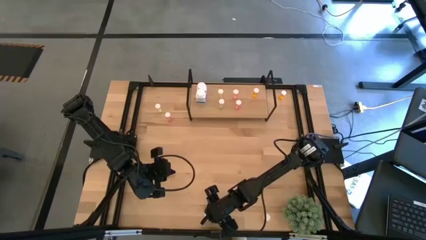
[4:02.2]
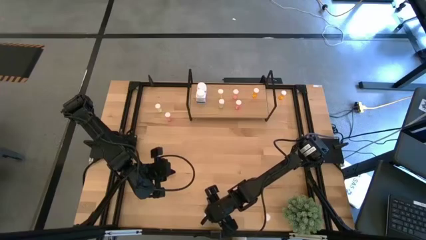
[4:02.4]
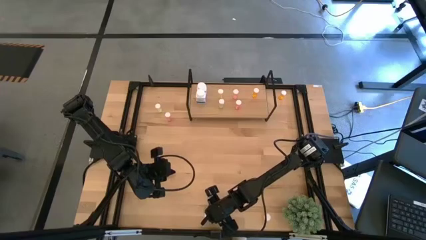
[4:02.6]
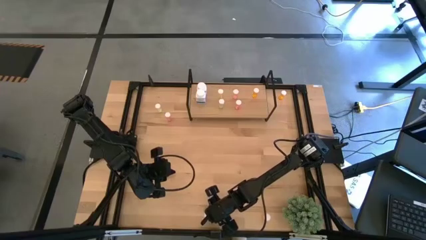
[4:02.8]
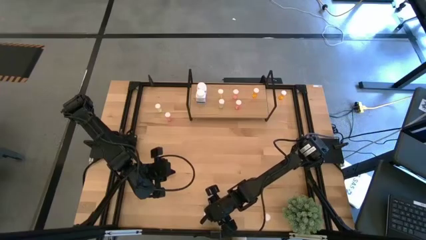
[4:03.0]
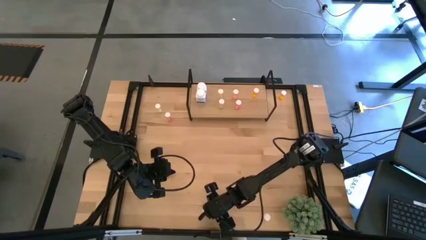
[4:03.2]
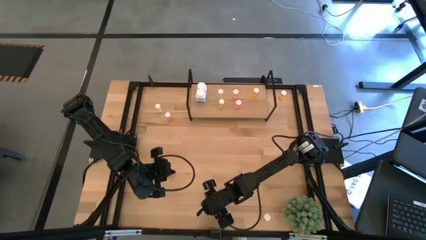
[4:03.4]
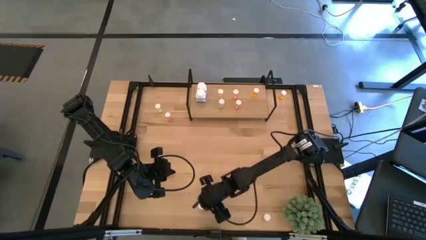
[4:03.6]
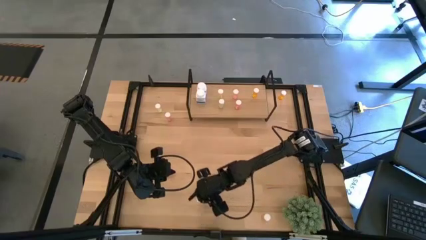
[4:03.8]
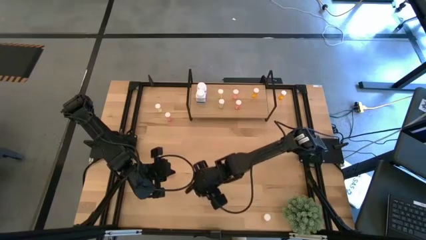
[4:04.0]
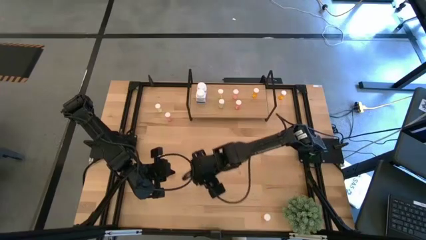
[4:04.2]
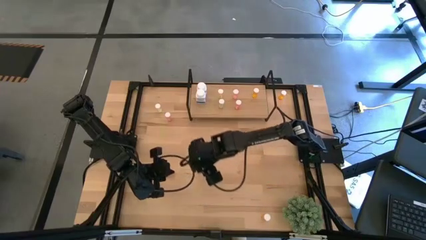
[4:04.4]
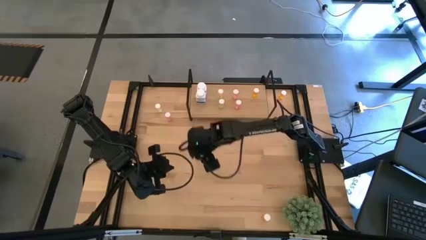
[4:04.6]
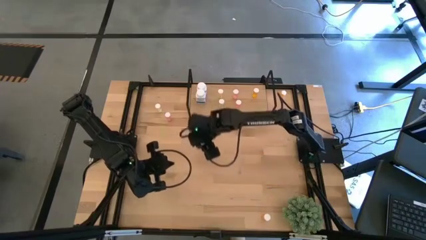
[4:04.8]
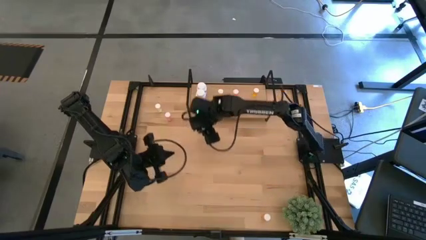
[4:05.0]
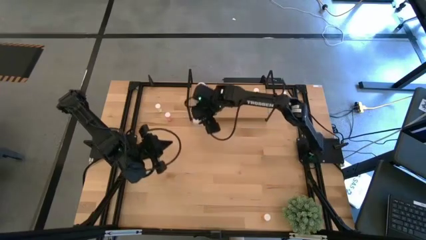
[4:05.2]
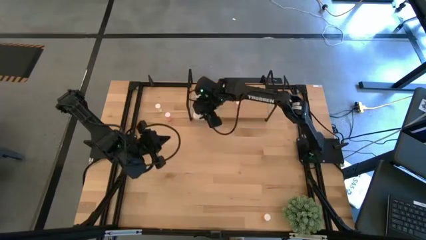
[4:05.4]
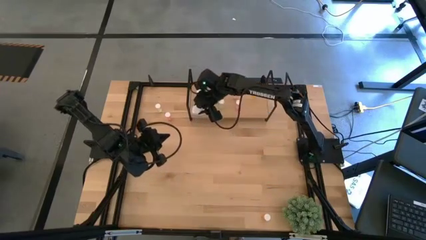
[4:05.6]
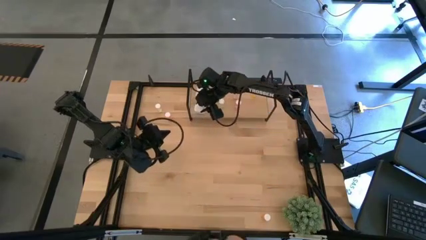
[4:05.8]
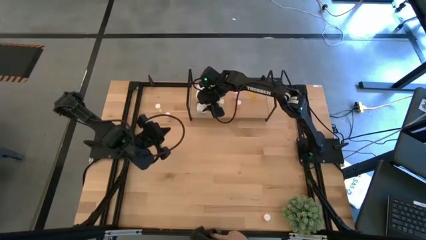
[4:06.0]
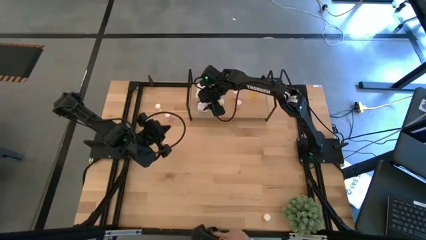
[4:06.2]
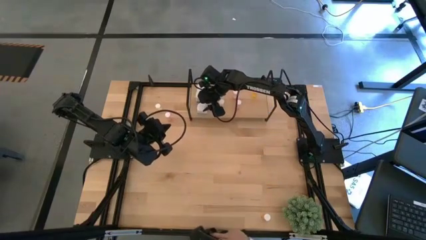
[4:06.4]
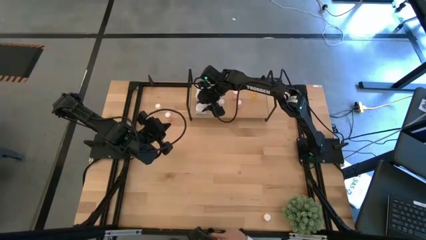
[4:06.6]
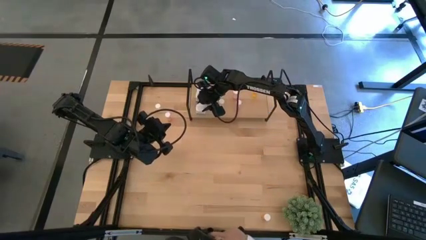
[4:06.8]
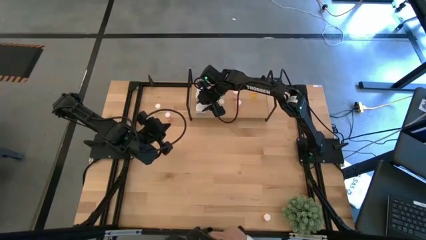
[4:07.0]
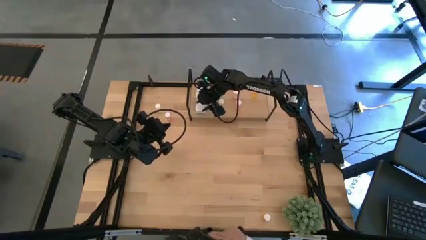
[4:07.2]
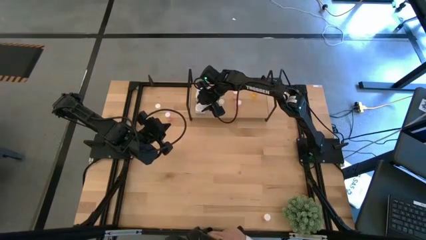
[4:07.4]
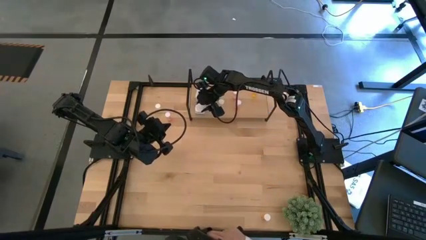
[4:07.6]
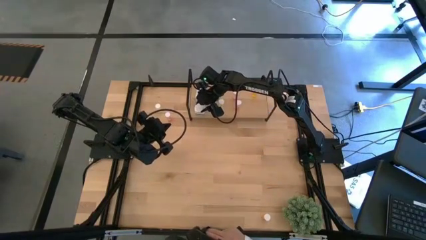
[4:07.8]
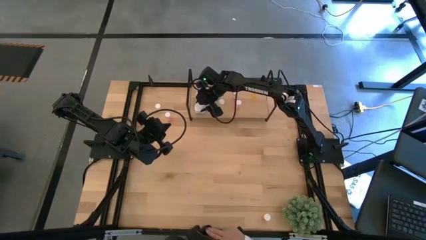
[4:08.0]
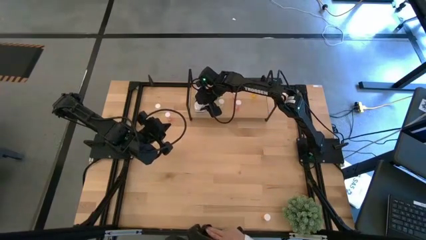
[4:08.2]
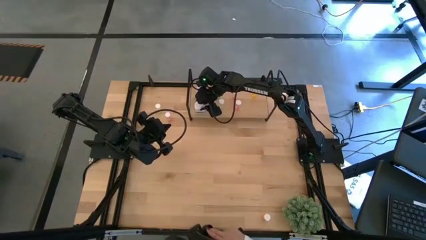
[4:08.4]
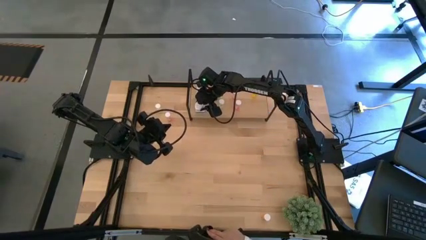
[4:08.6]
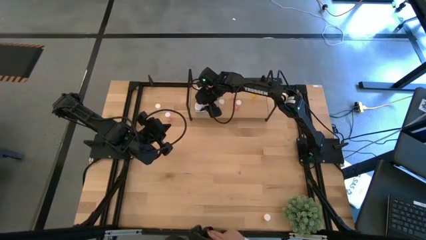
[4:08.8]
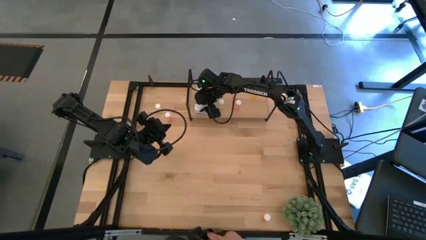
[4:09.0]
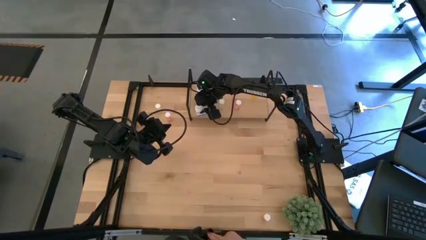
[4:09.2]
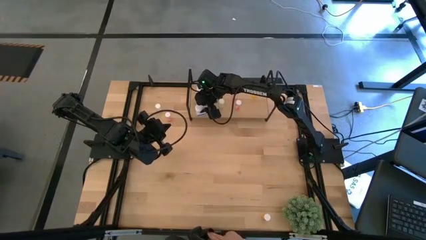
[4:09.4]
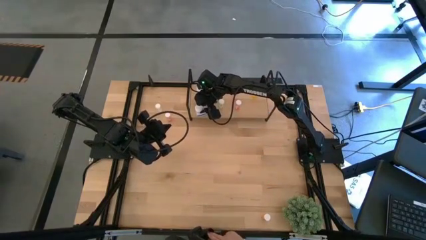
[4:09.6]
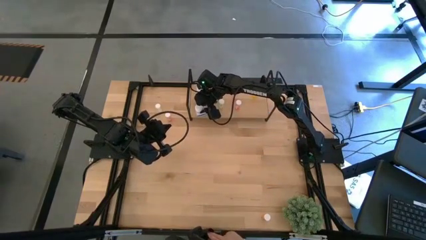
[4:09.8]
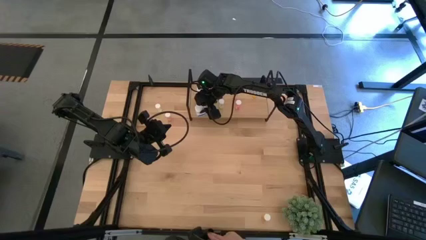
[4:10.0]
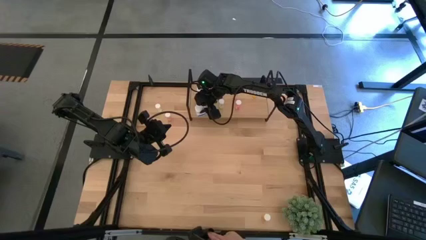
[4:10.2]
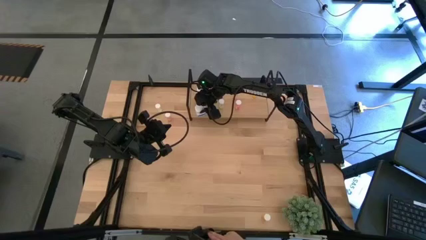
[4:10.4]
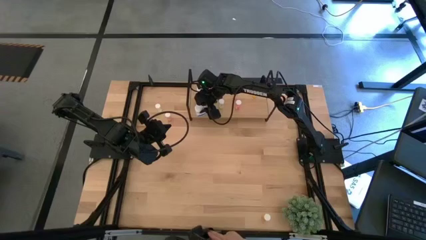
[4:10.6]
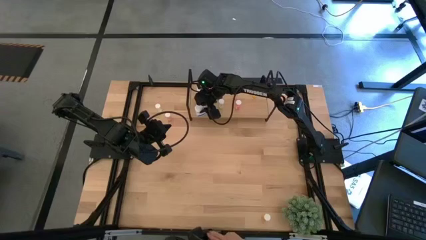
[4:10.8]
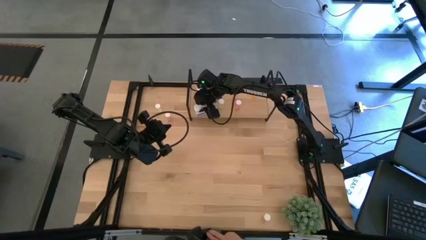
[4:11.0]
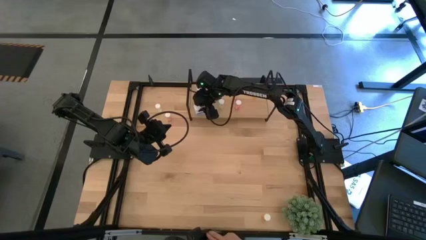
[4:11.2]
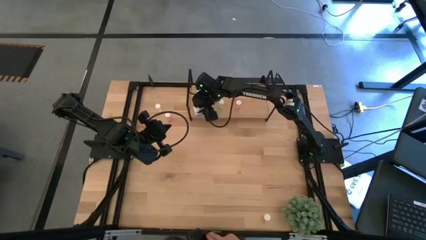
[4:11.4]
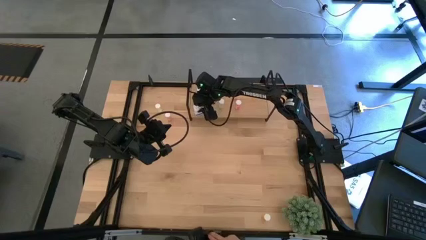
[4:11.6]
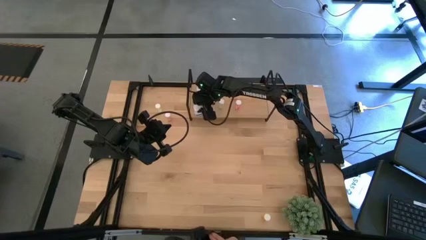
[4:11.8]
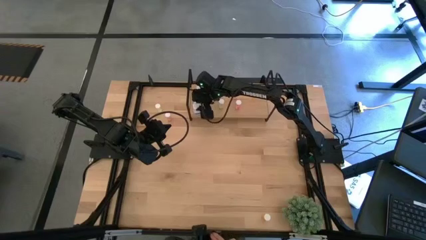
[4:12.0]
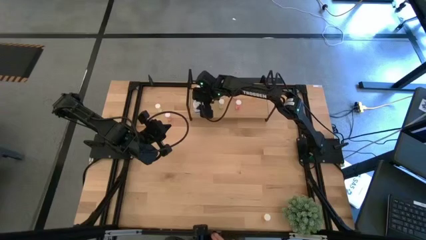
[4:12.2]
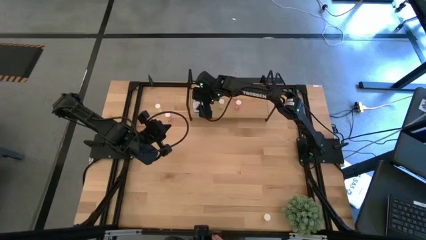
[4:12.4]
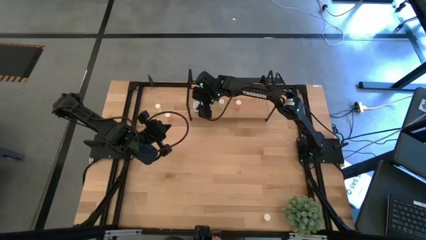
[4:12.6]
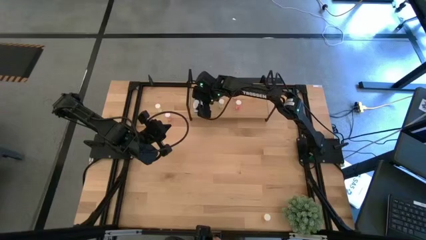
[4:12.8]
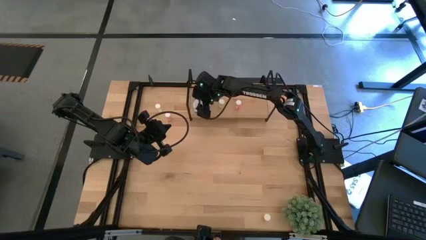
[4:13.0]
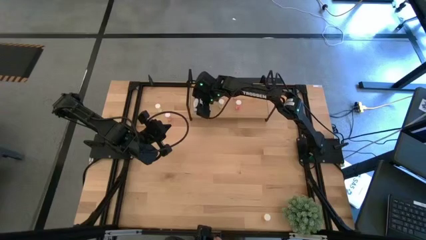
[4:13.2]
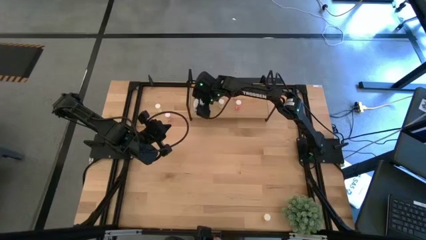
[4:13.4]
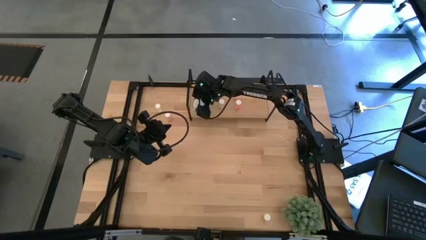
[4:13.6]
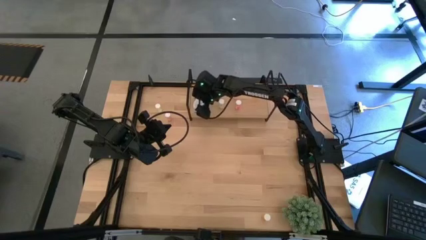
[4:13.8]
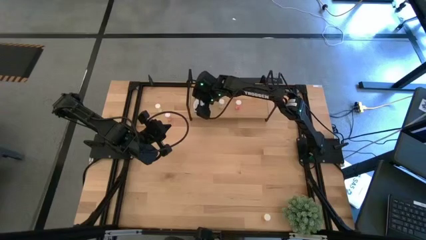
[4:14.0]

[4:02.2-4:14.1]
Task: Pick and place medicine bottles onto shelf by color
Put the white pill bottle on the shelf aligned with the other white pill bottles
